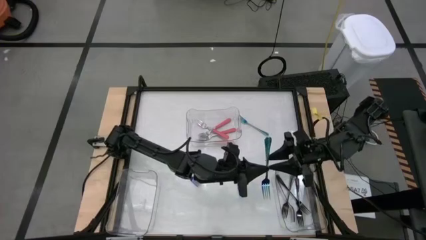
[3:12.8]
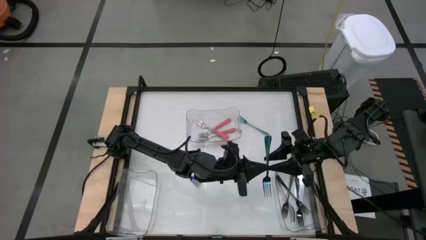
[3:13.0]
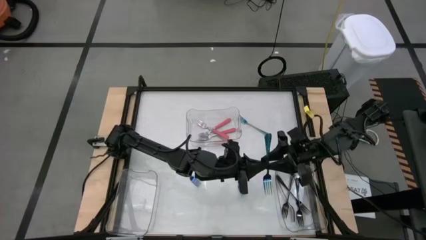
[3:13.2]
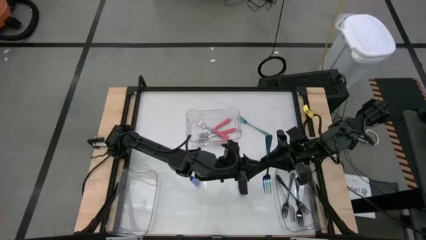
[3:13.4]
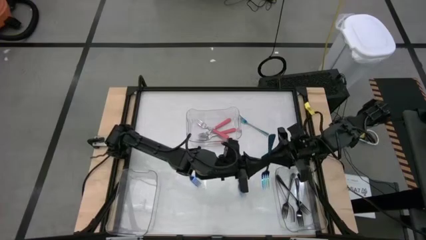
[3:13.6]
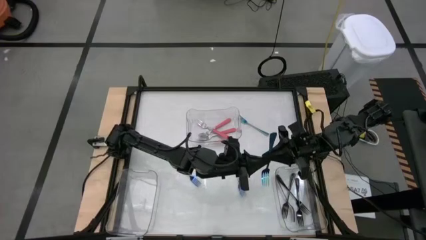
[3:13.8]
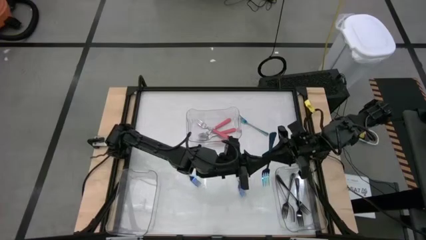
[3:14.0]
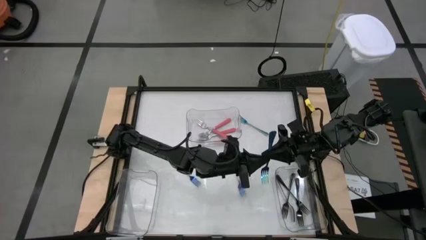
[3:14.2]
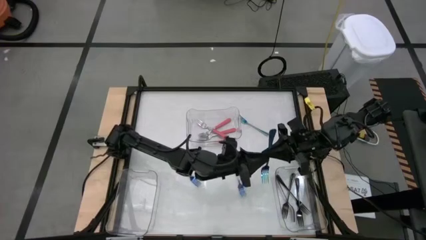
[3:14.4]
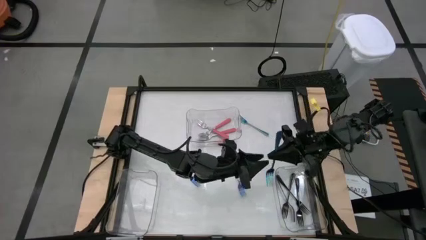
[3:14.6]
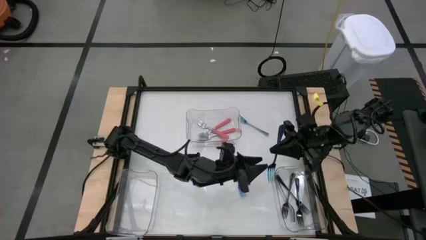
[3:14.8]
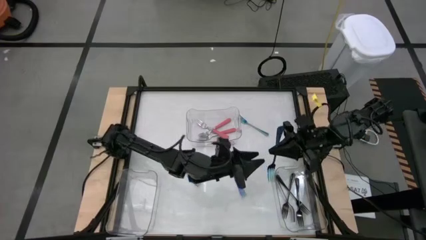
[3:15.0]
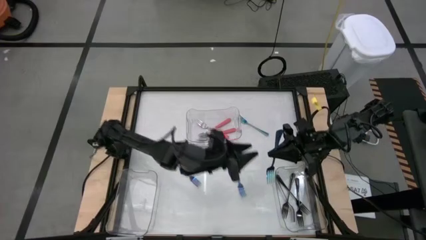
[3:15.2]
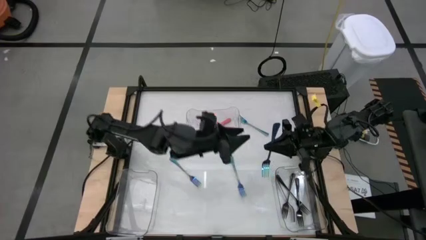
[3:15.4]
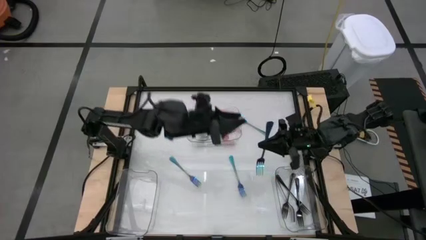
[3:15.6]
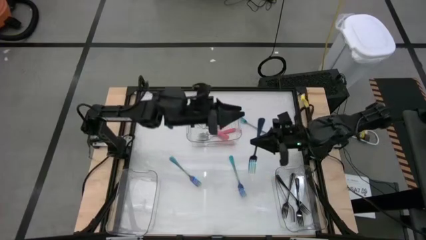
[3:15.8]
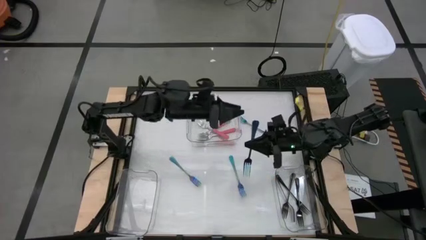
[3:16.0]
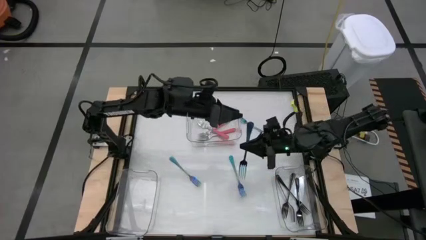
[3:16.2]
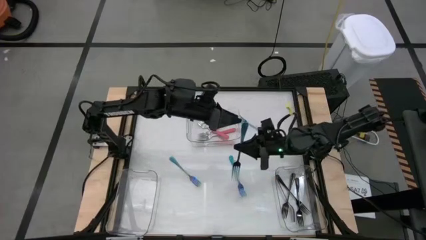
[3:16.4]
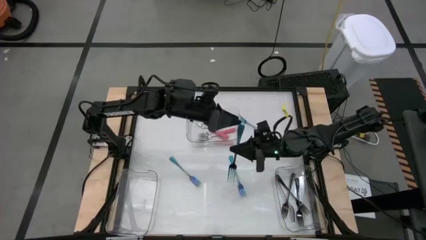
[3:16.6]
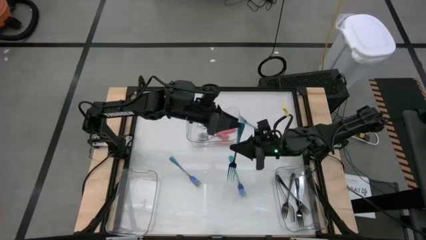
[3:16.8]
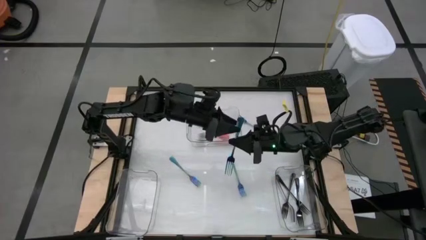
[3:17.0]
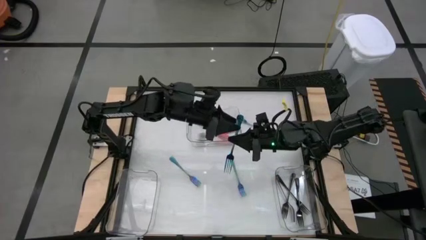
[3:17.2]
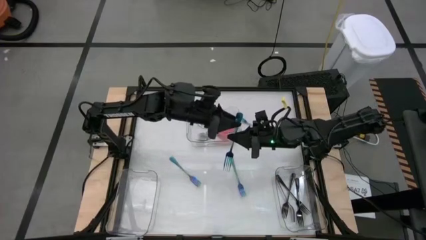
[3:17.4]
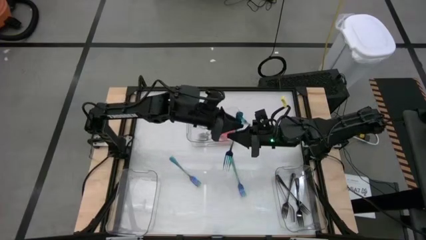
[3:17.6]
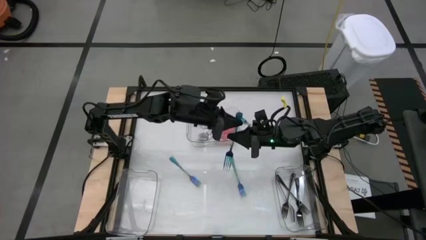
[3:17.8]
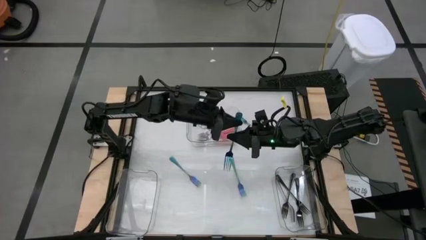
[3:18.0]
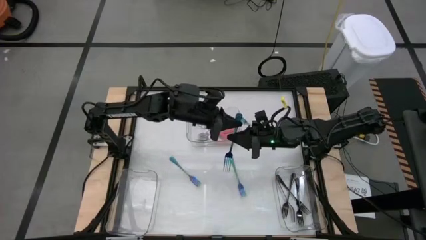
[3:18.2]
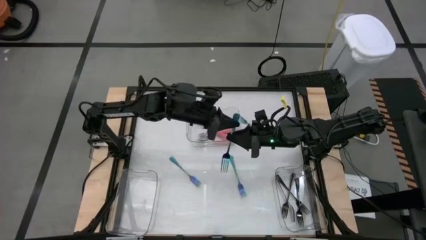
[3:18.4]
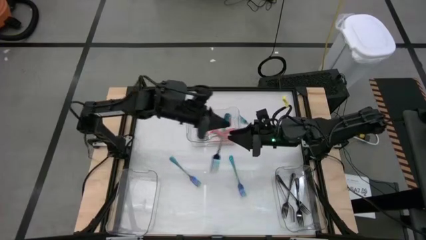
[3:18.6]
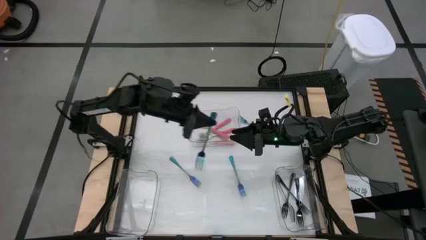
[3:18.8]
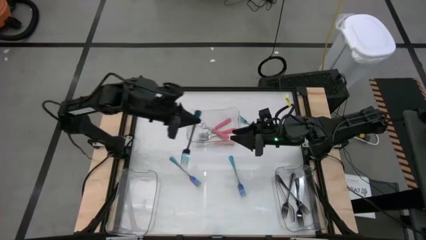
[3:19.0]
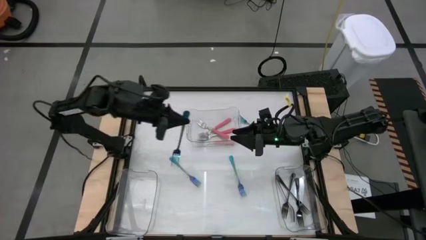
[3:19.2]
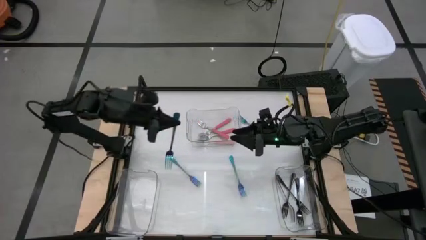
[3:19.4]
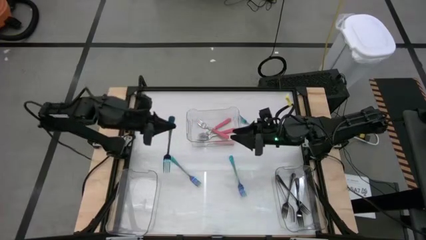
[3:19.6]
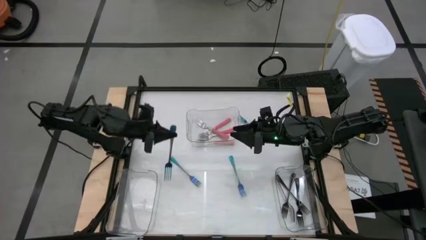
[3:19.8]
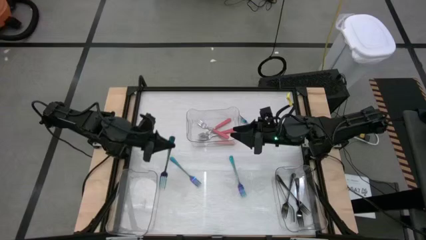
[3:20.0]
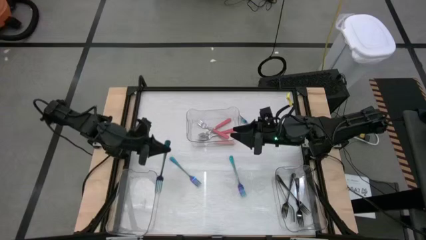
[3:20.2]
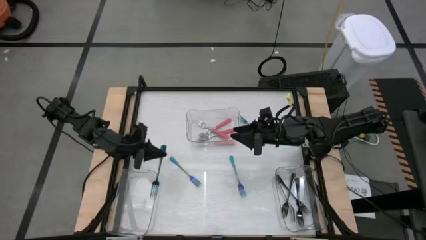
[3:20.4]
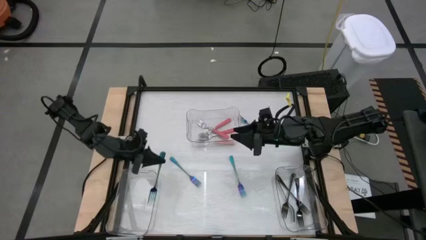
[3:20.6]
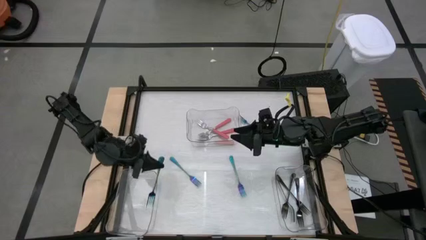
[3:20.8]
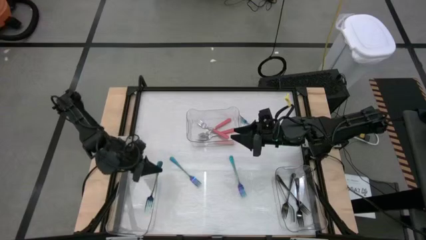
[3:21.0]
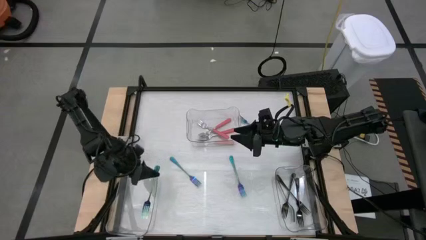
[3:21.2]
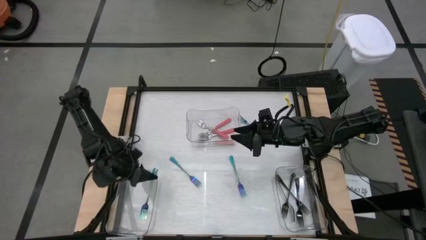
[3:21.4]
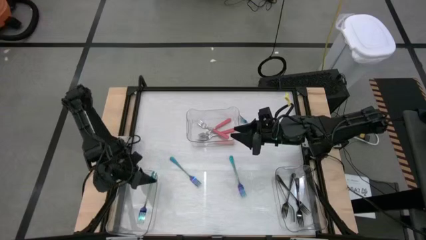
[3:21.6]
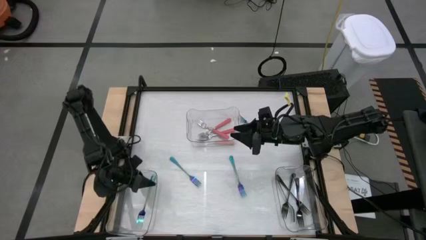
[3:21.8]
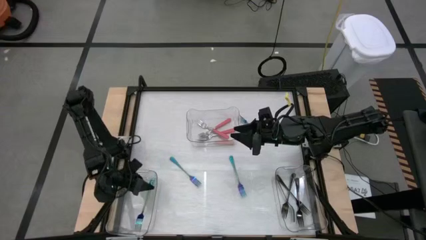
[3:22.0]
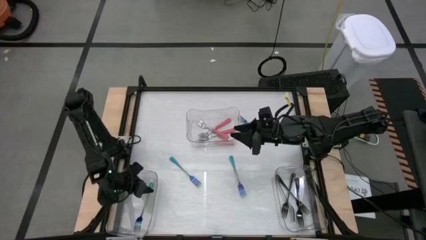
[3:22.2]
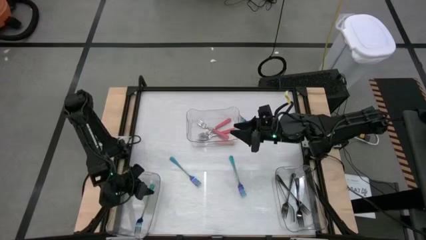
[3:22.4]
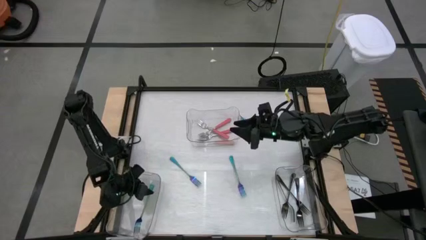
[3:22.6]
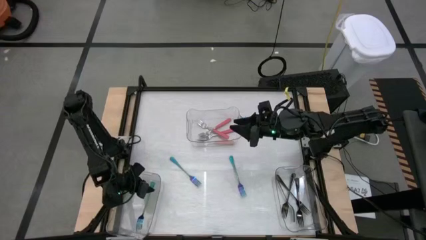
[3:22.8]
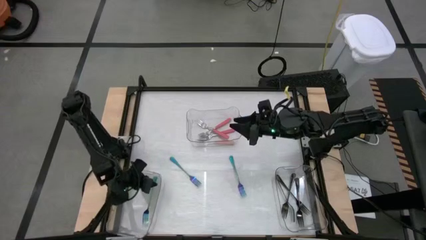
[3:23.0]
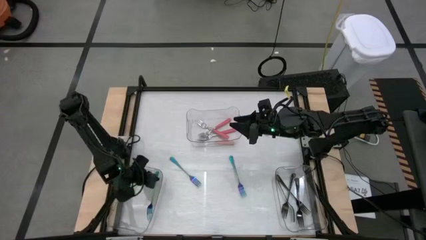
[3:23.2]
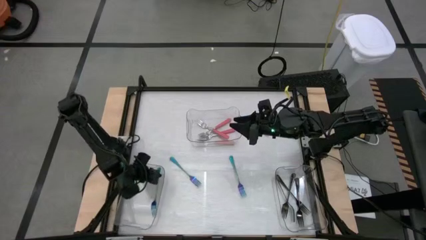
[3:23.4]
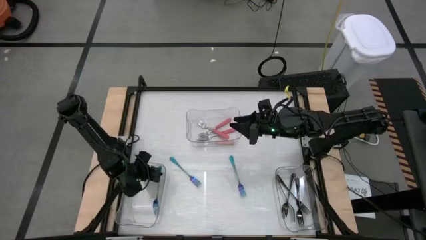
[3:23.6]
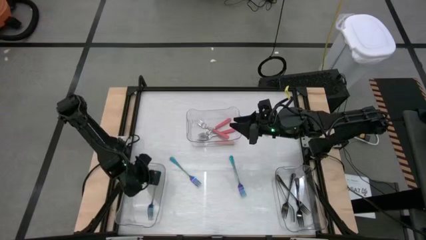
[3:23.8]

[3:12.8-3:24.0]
Task: Sort silverware by color (type)
Put the blue fork into the left transparent bin
